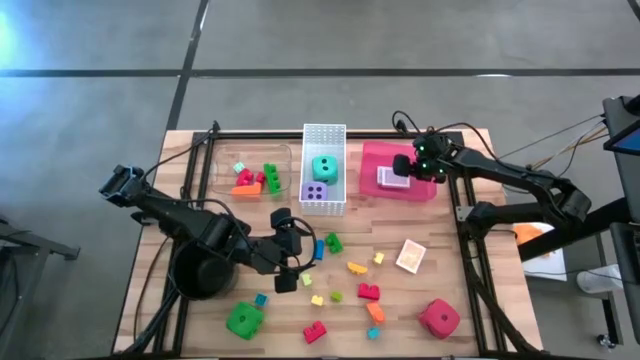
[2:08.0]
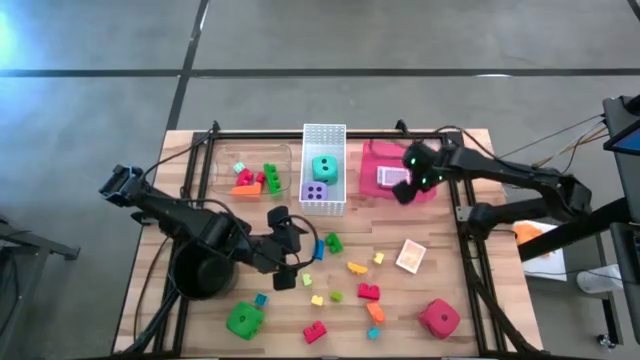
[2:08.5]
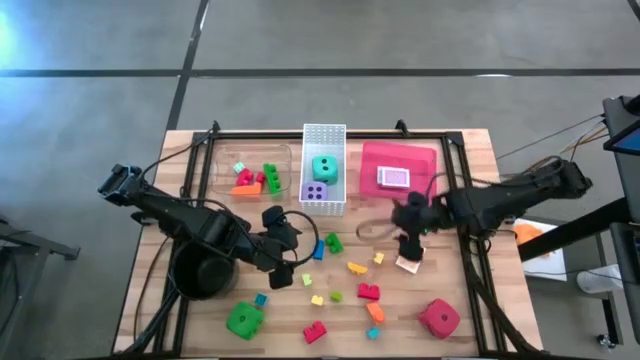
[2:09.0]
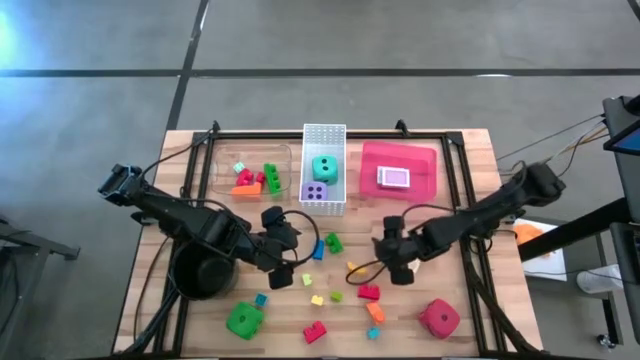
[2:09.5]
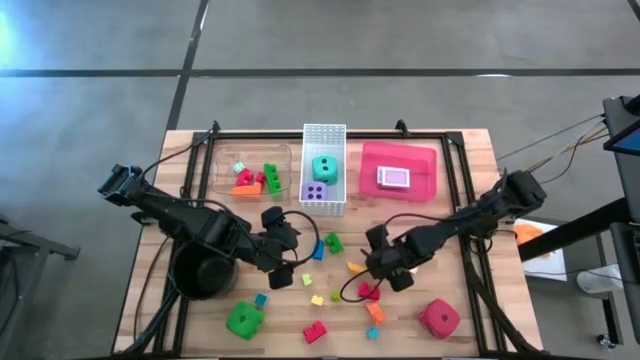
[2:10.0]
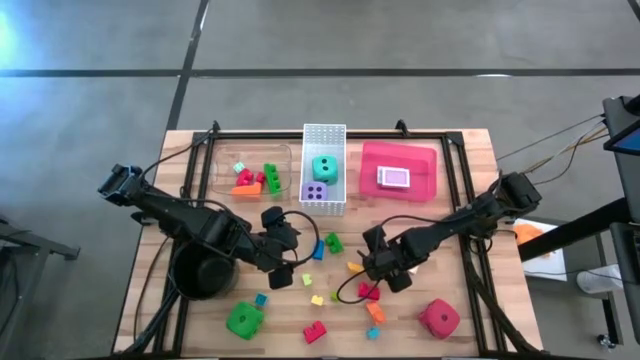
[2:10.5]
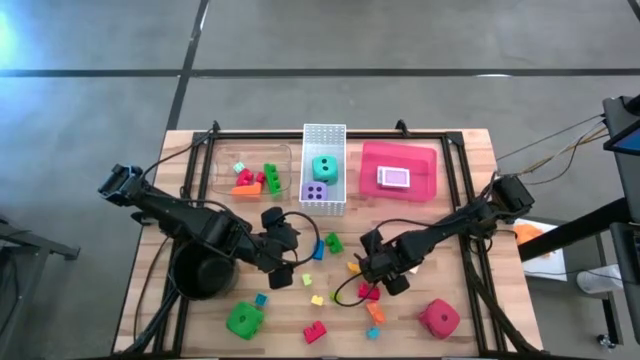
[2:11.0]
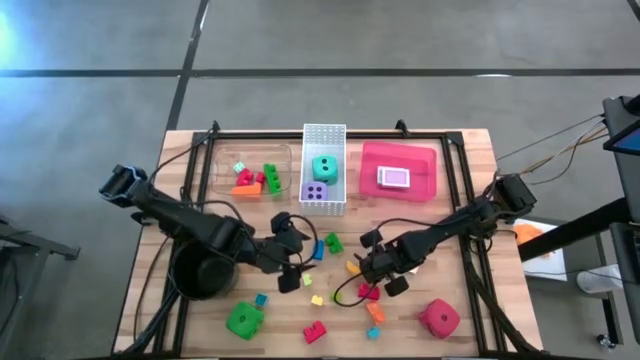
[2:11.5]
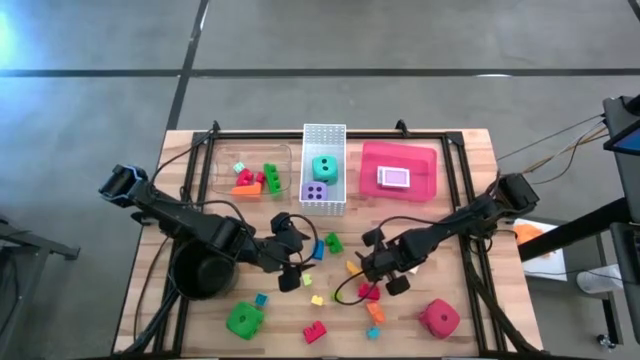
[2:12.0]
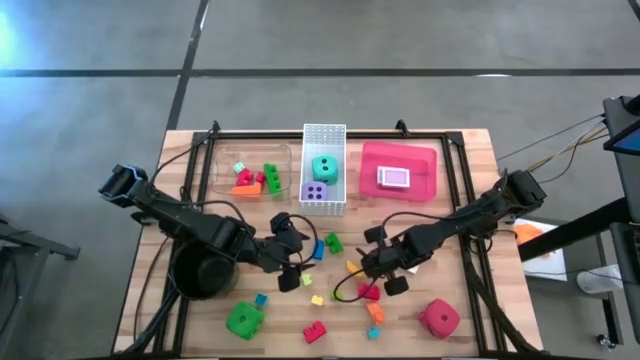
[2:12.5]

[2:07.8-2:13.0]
Task: Pick & Place Toys
Put the light yellow game piece into the transparent bin

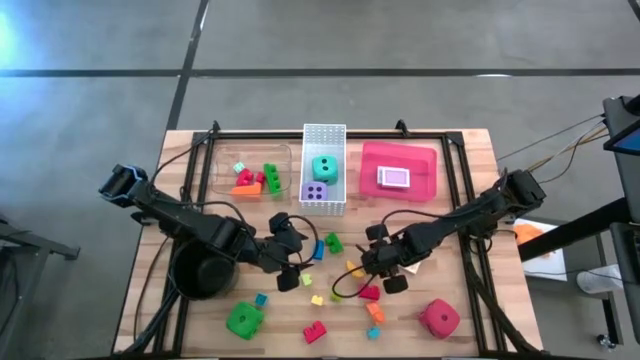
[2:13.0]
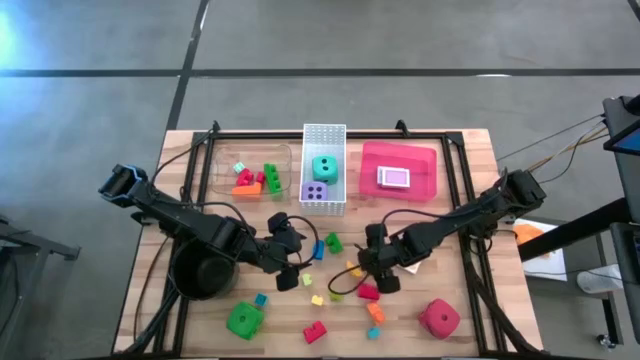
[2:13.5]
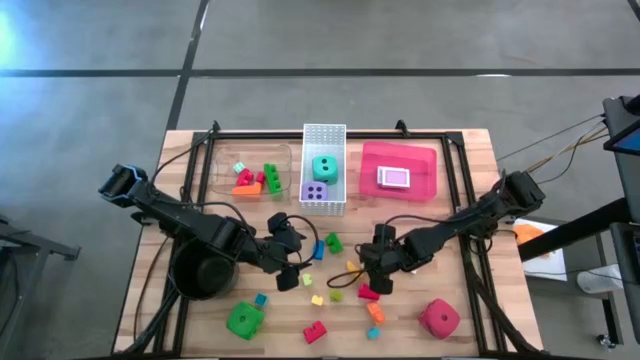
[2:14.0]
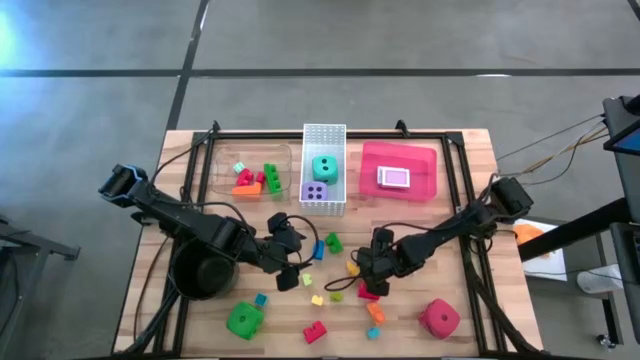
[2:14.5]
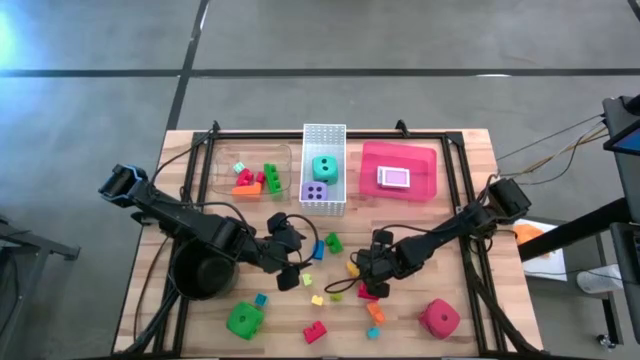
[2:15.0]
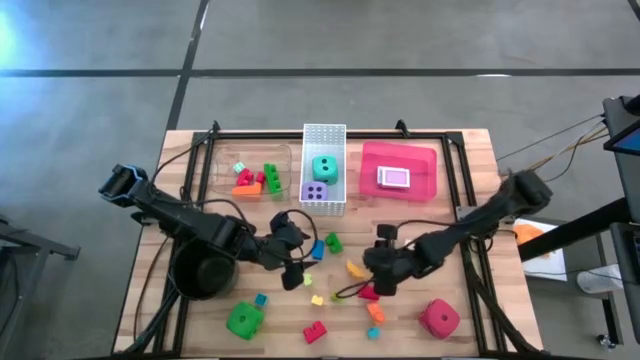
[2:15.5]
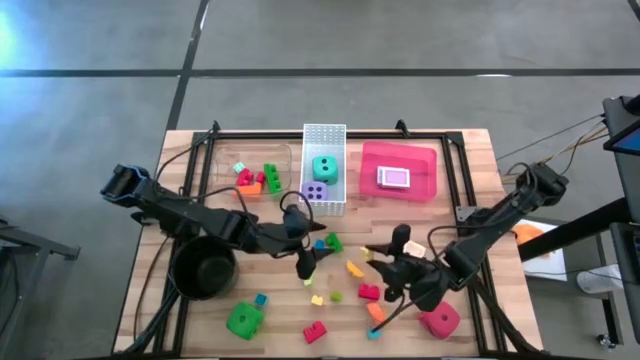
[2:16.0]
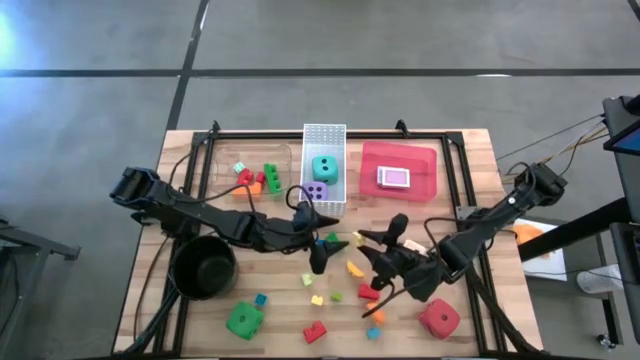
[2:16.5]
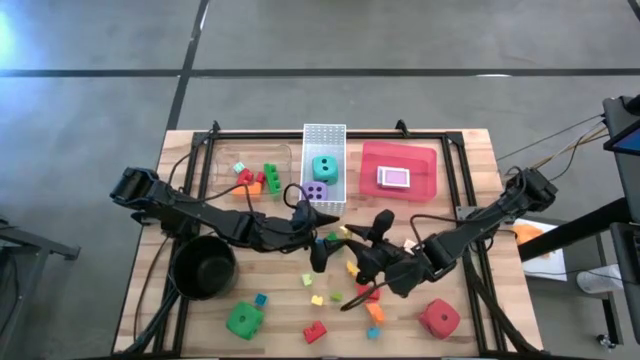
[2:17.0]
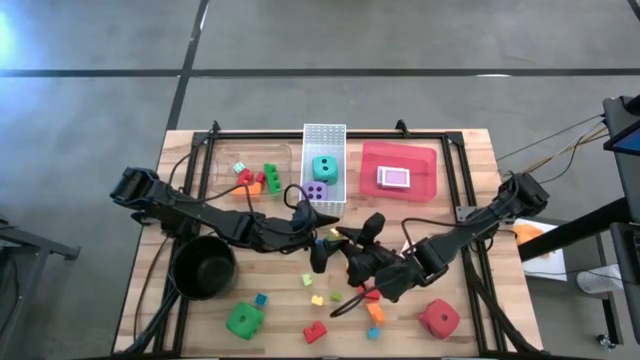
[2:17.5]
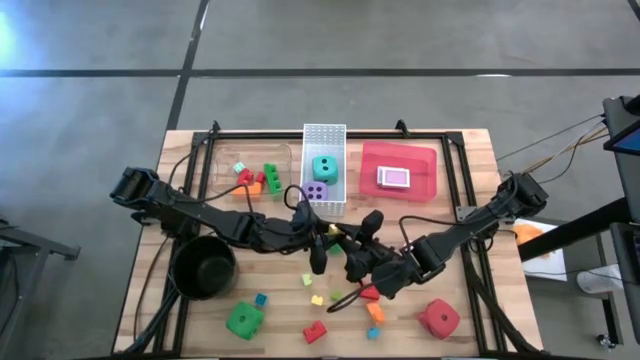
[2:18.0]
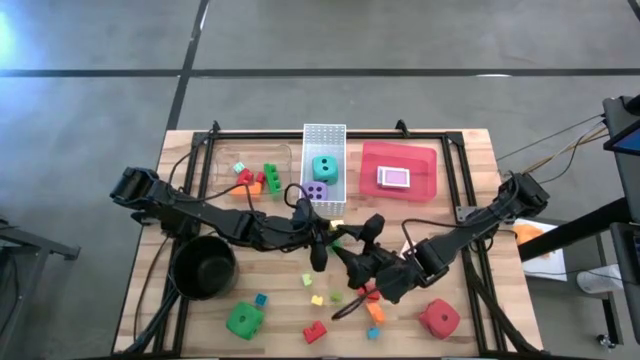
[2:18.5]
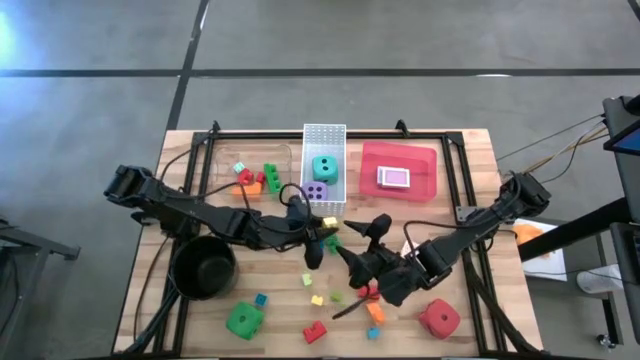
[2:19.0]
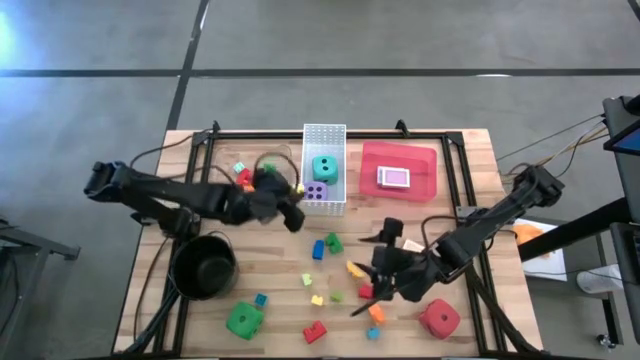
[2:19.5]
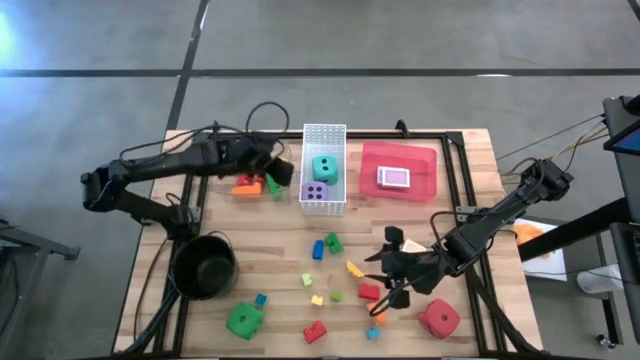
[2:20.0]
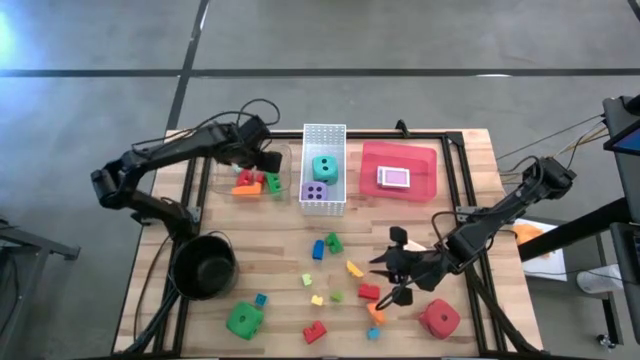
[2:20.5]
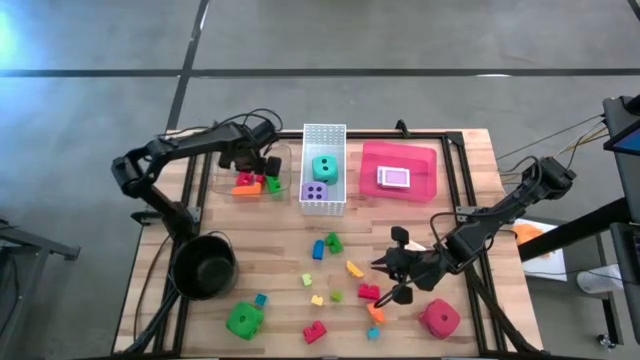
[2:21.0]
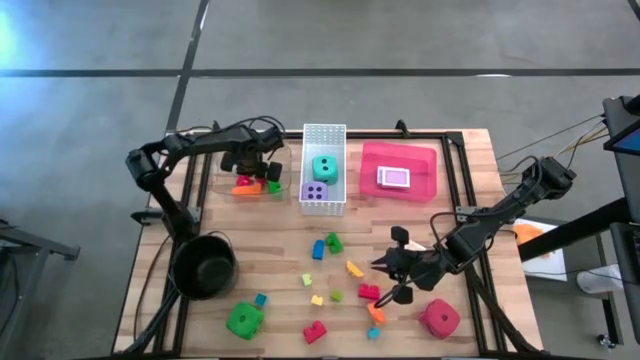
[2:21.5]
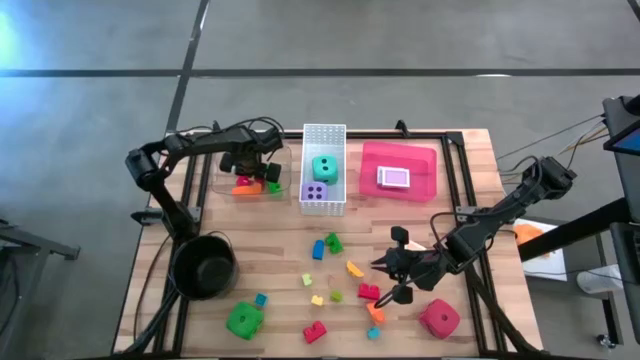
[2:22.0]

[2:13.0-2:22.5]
Put the light yellow game piece into the transparent bin
